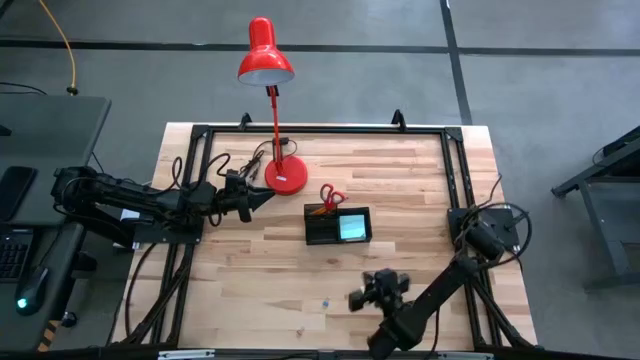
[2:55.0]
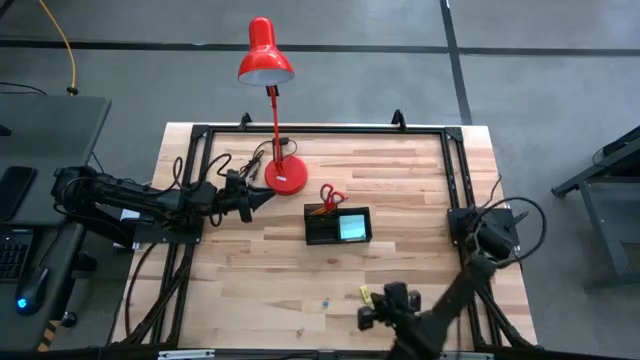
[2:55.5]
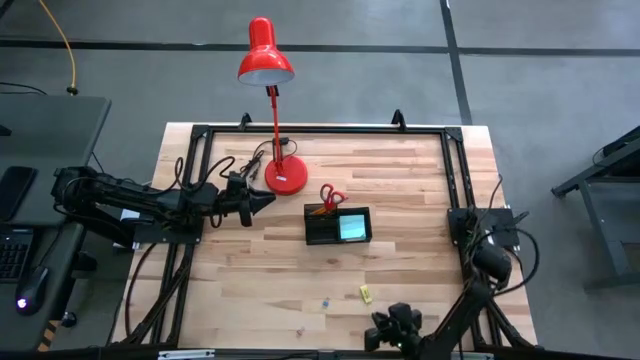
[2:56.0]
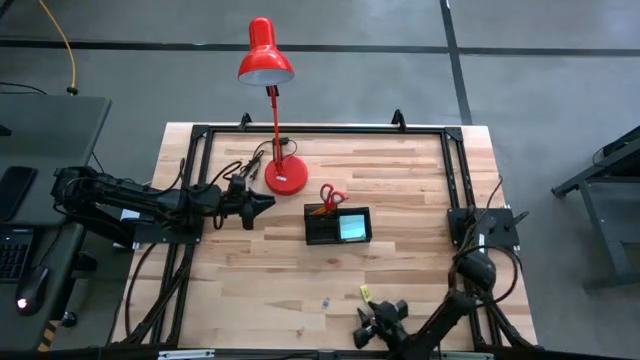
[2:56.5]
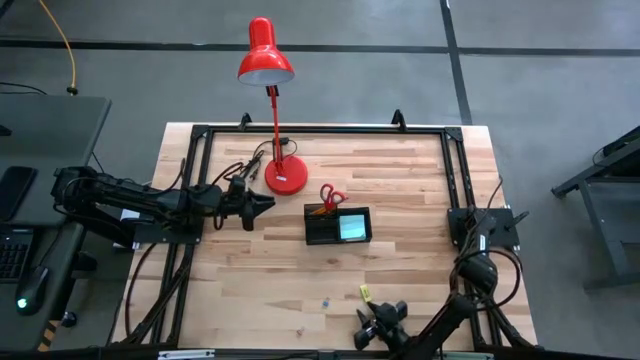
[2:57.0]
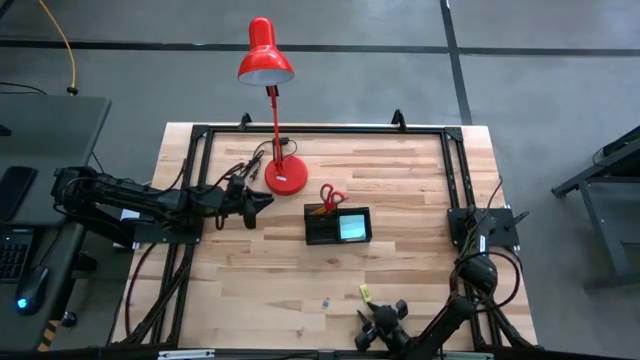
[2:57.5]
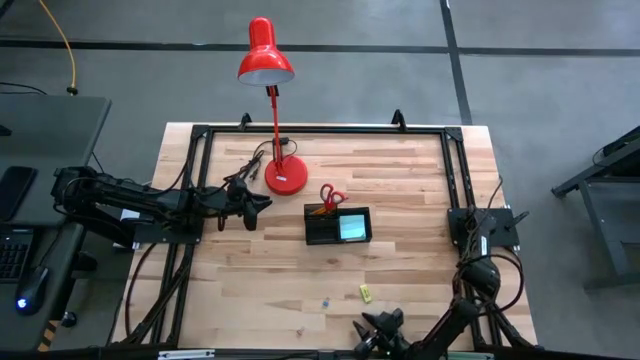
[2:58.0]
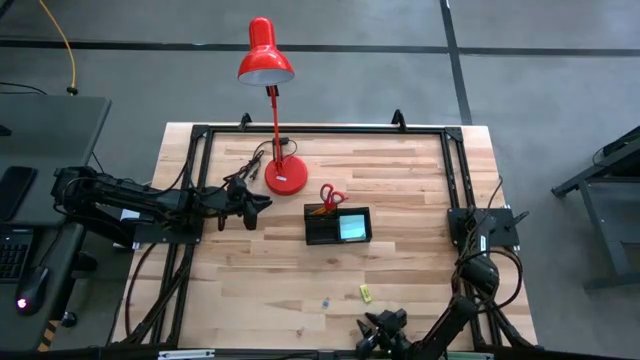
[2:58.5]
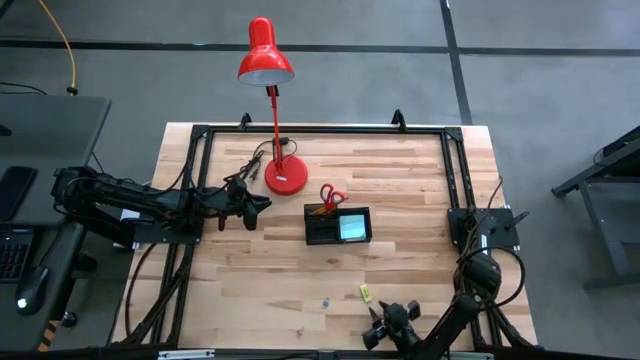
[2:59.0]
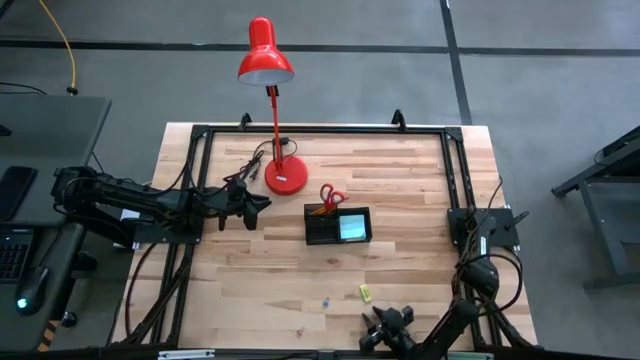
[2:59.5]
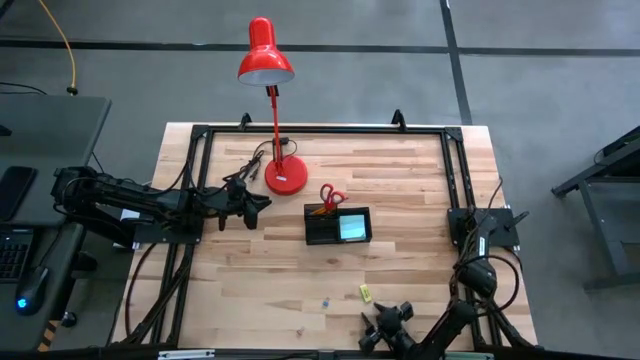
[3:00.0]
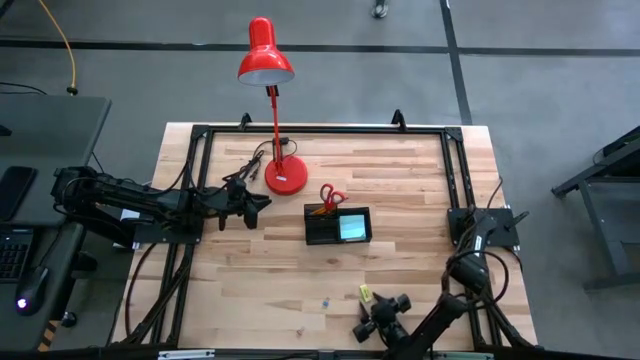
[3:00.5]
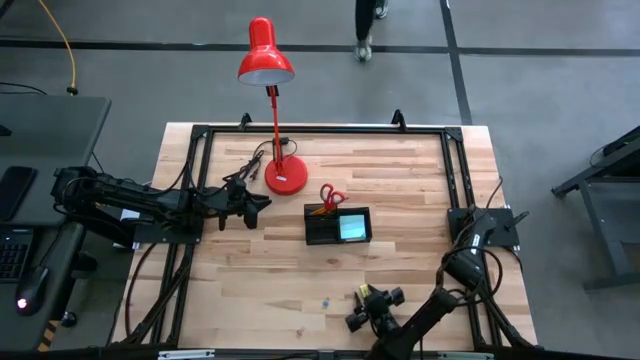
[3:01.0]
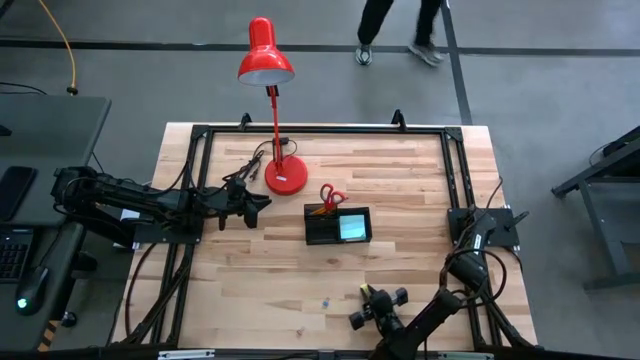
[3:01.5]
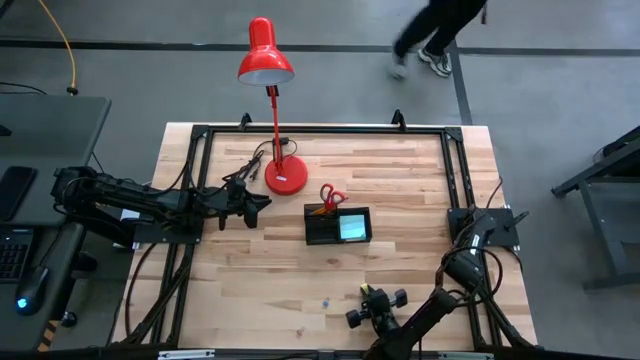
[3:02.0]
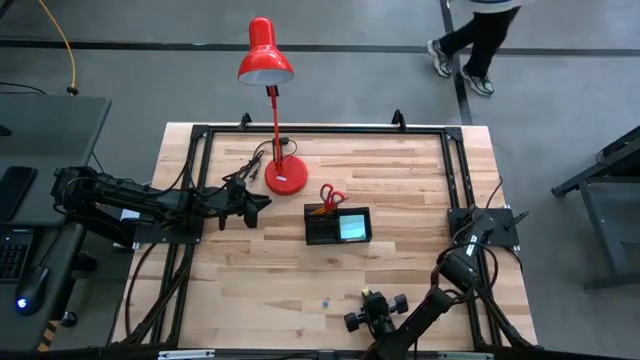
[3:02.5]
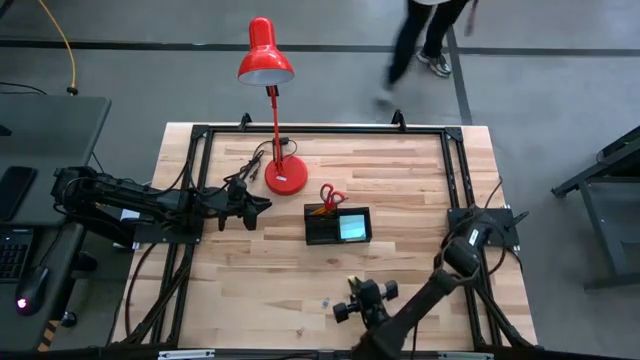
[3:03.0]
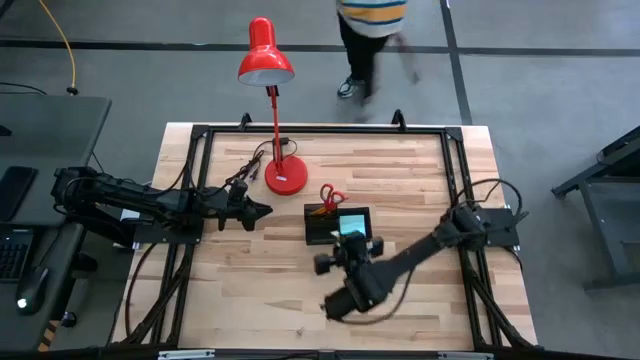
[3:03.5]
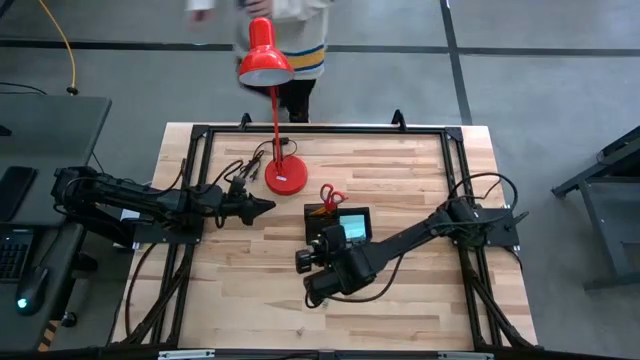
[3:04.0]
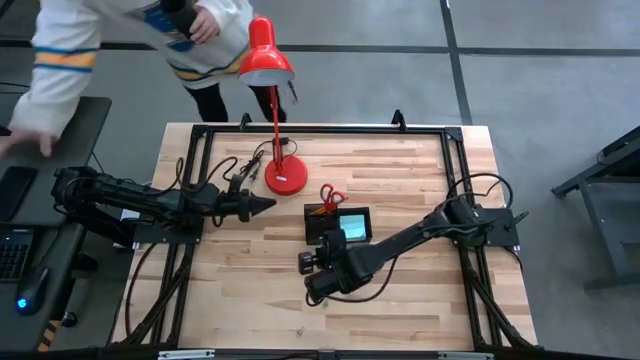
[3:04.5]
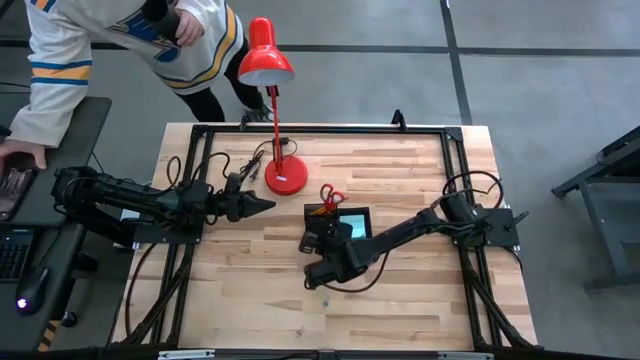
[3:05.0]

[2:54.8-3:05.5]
Task: Pick and place office supplies into organizer
Put the yellow eraser into the black desk organizer

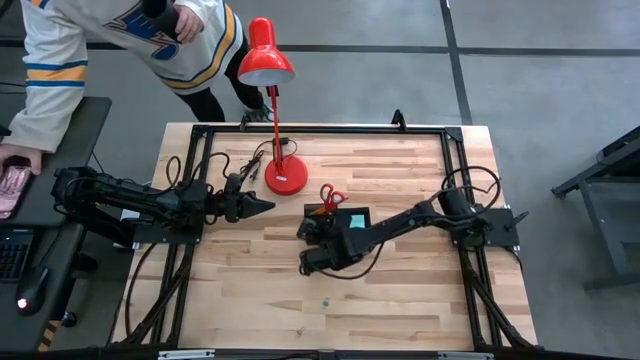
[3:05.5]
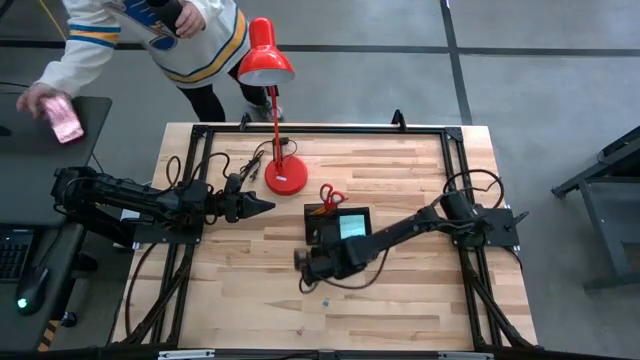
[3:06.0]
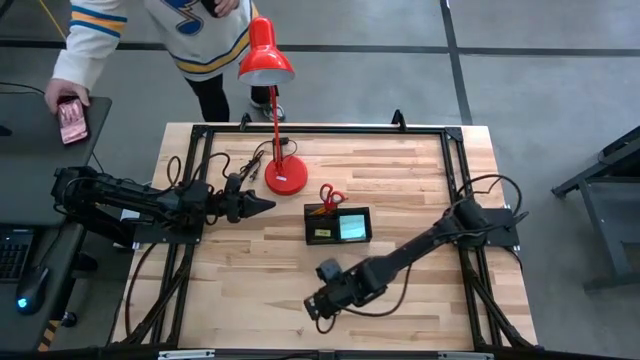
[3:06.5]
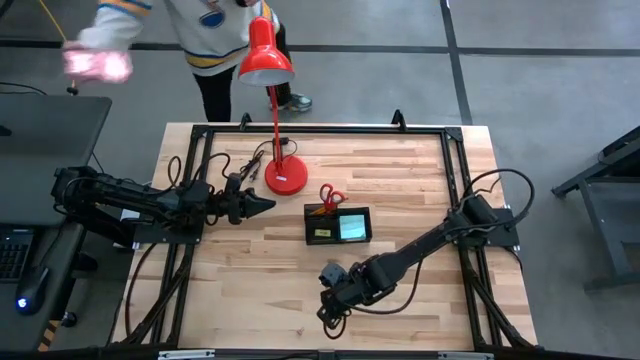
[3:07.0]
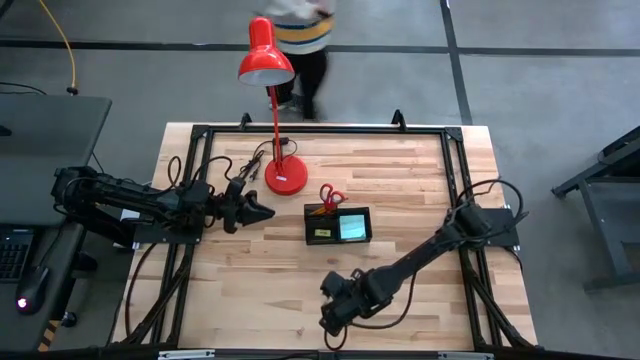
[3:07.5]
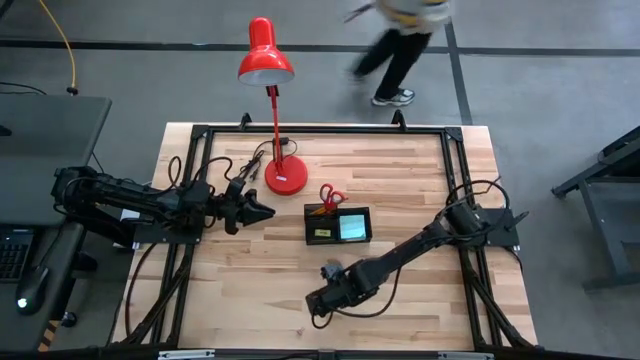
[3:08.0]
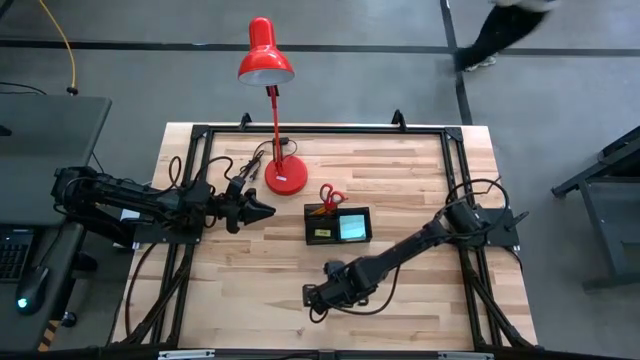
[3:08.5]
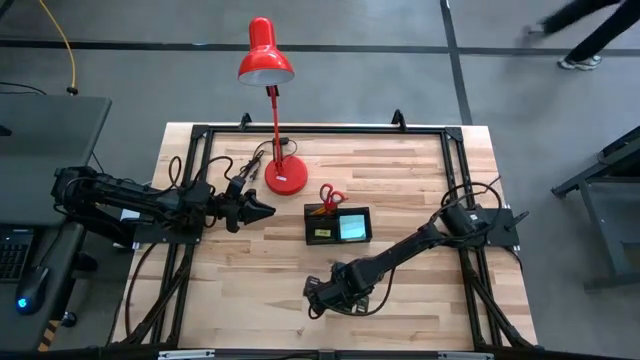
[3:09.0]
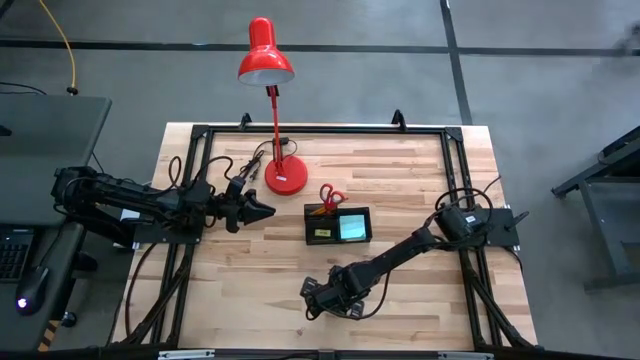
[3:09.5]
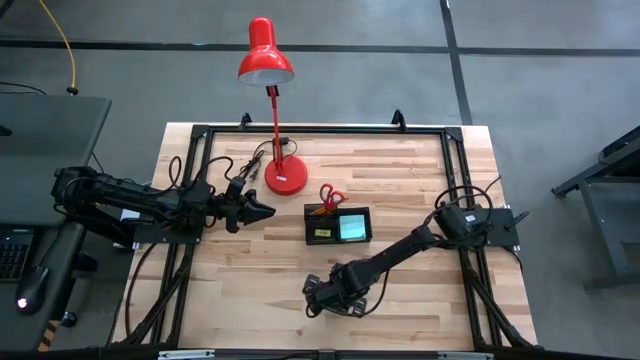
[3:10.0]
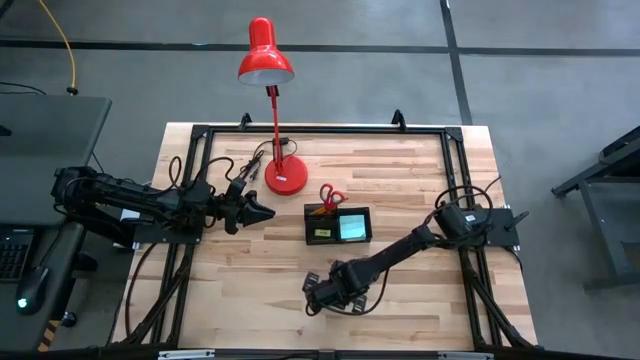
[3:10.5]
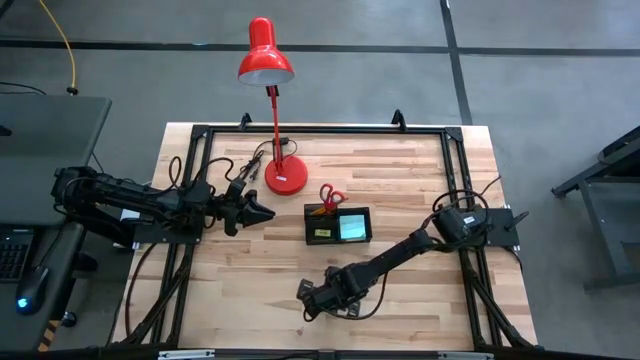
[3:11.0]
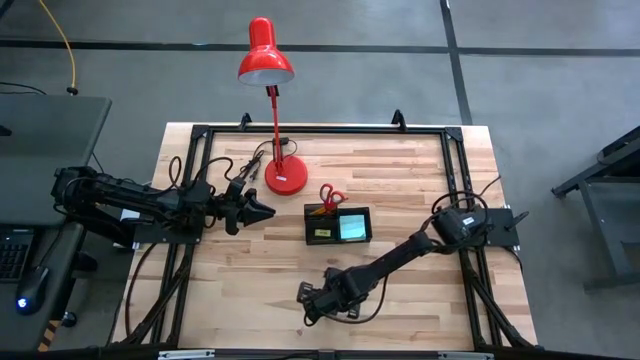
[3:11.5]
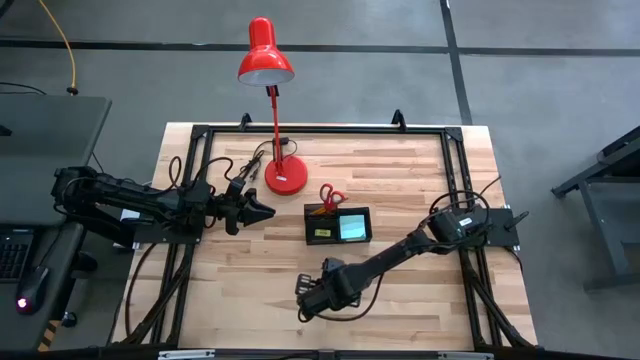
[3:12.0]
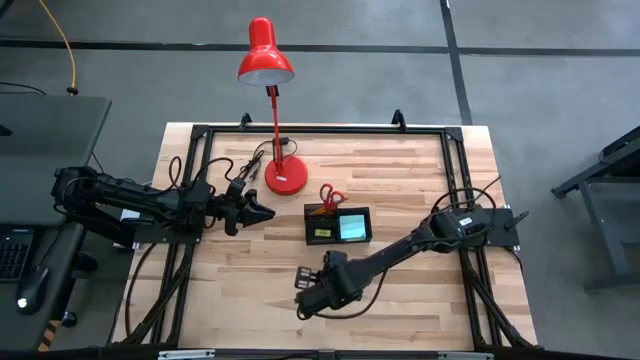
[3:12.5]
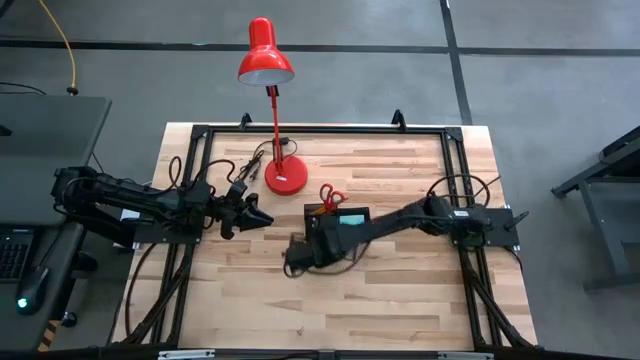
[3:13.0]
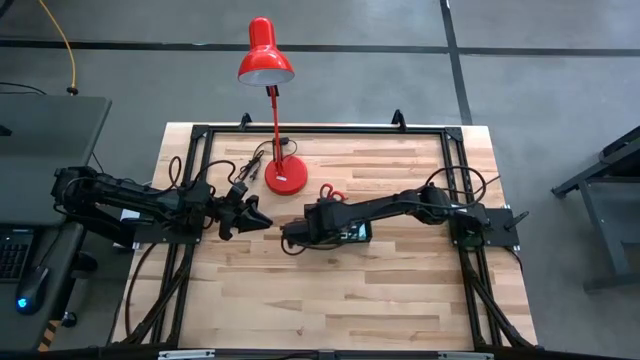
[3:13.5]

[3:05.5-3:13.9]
Put the blue binder clip into the black desk organizer

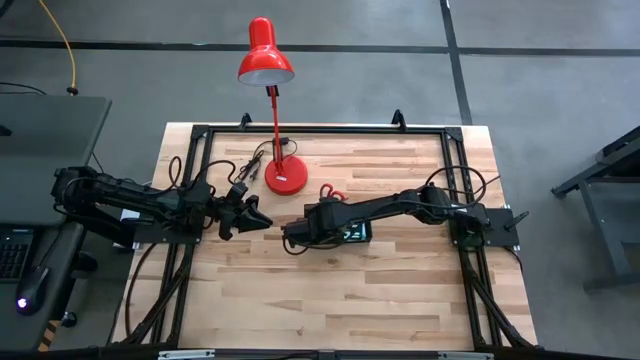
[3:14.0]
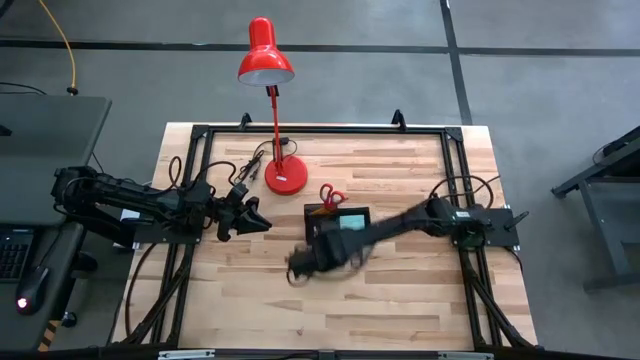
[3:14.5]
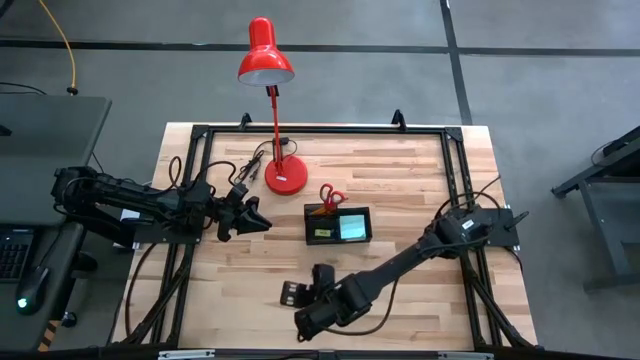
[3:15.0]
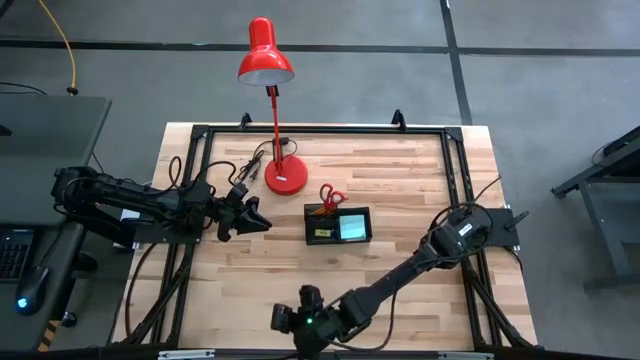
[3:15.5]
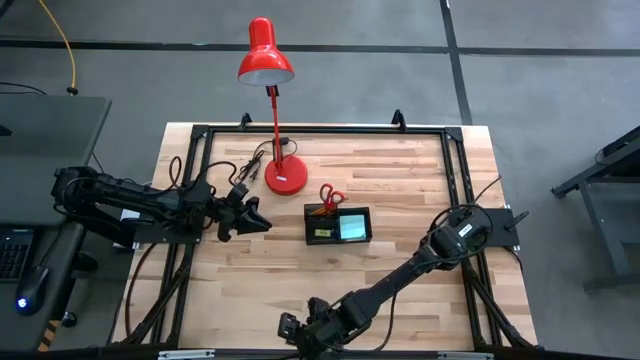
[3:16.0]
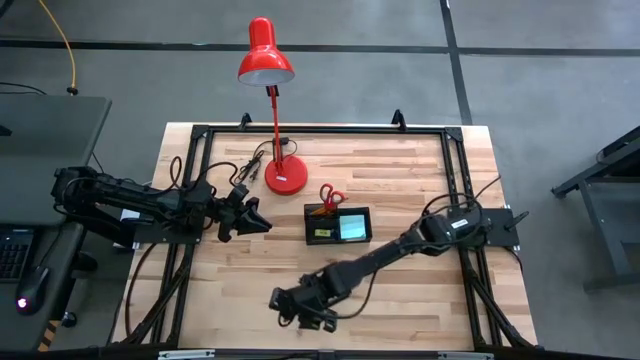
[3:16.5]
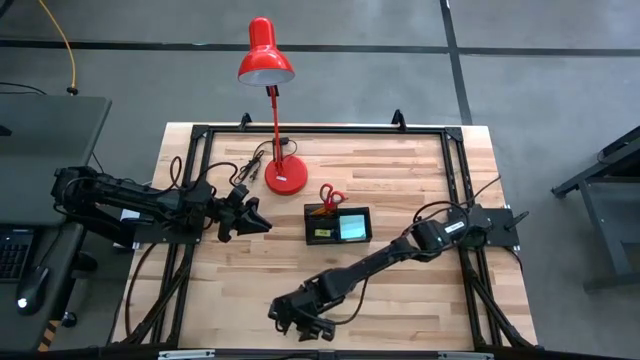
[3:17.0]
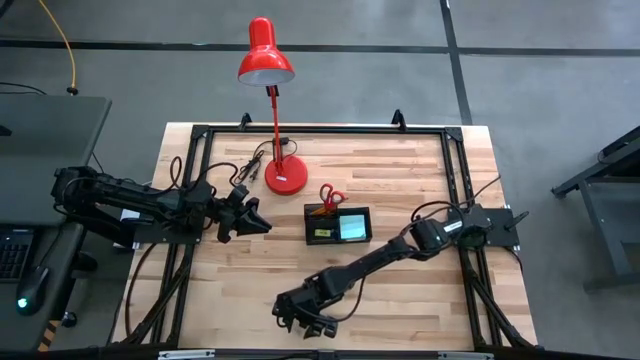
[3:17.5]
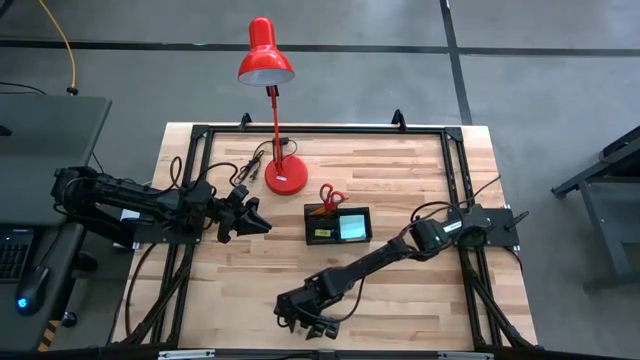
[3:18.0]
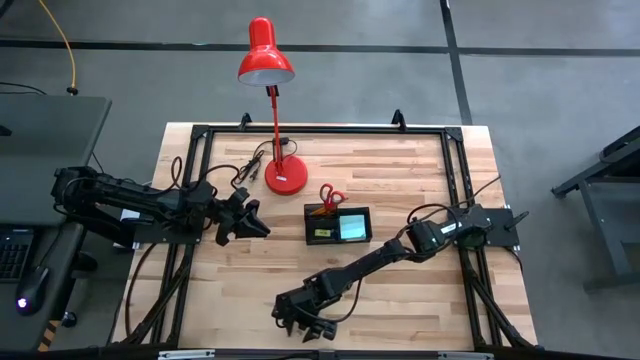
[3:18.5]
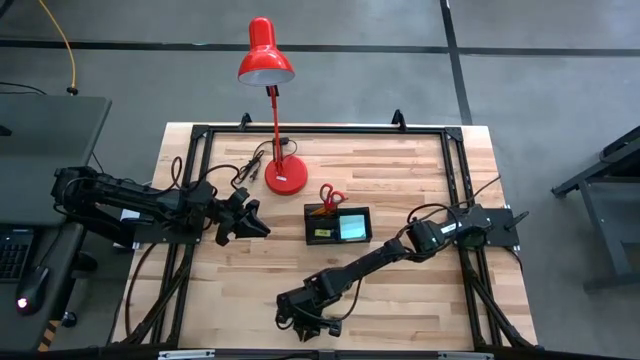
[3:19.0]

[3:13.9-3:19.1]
Put the pink binder clip into the black desk organizer
